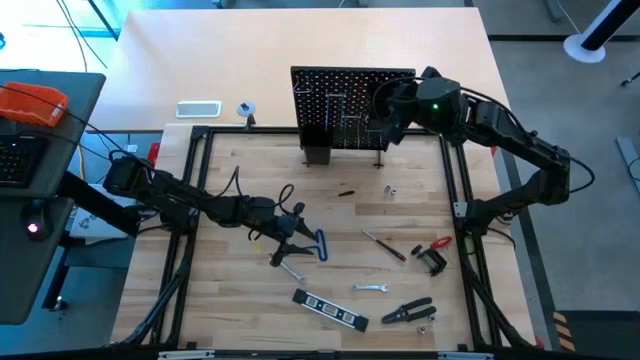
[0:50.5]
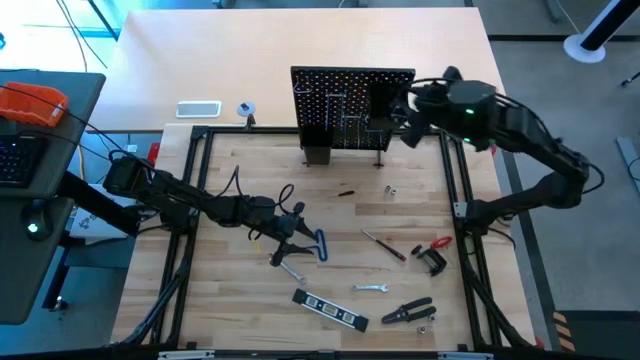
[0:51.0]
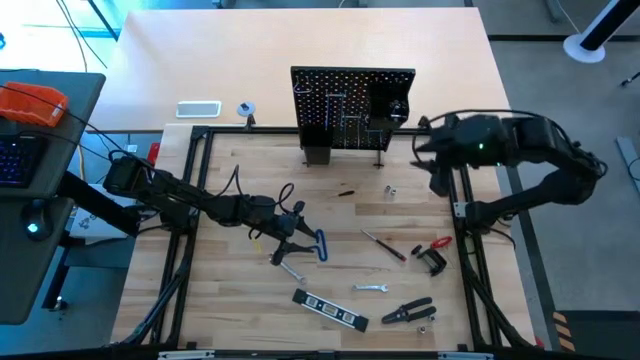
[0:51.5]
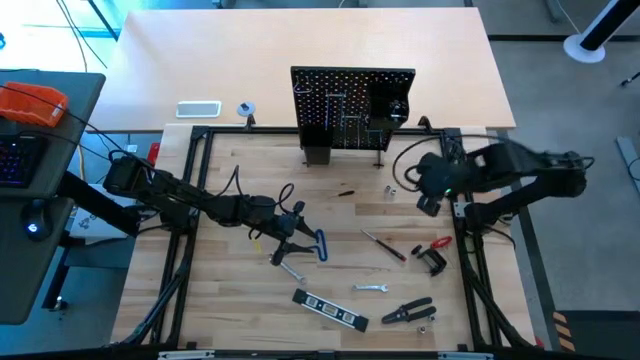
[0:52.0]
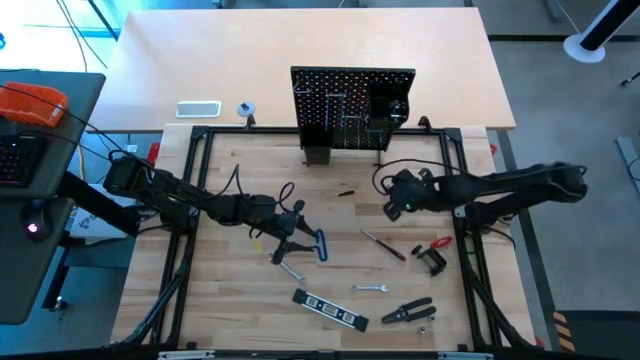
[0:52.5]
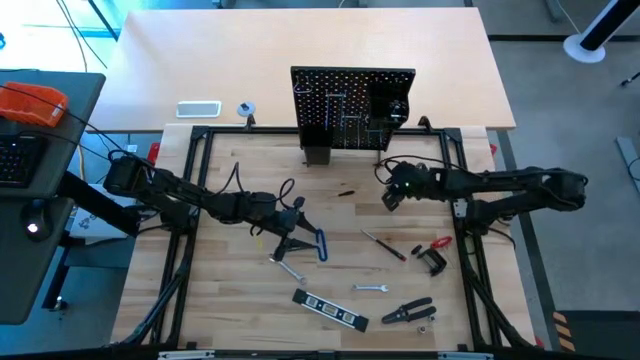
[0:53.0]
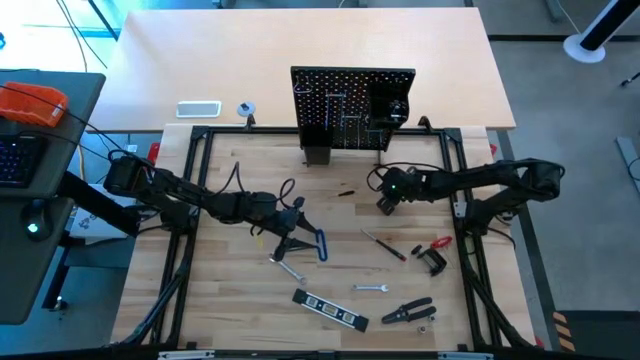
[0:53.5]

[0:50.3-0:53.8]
Task: Hang tools onto peg board
Put the bolts on the pegboard

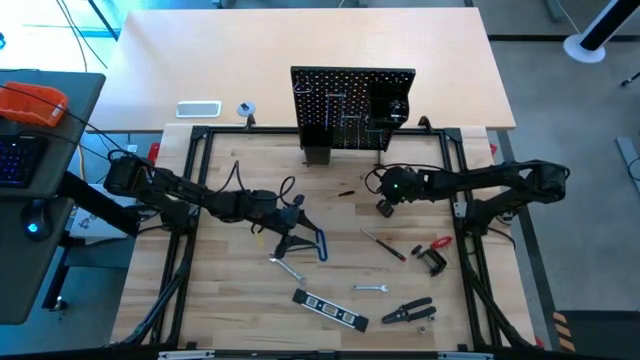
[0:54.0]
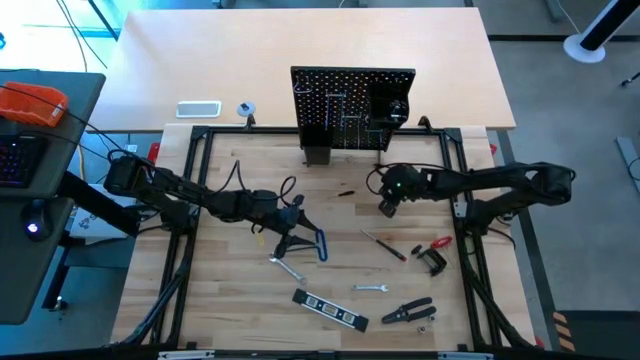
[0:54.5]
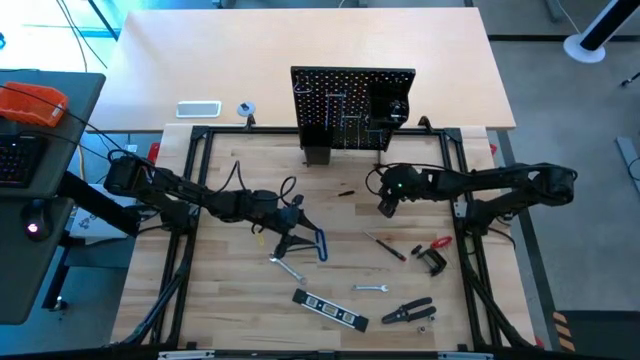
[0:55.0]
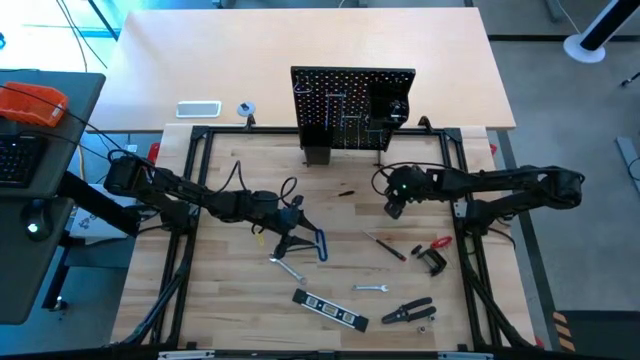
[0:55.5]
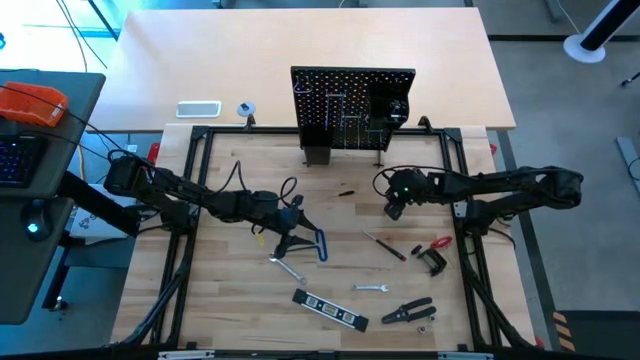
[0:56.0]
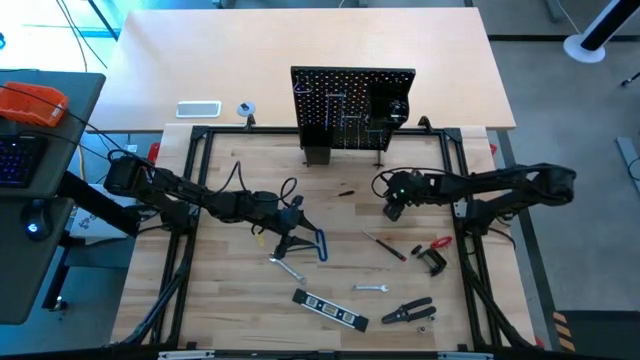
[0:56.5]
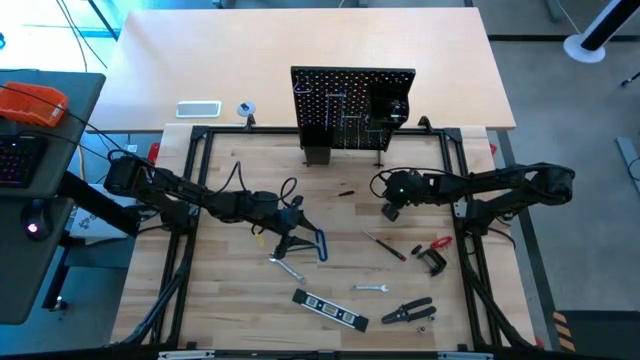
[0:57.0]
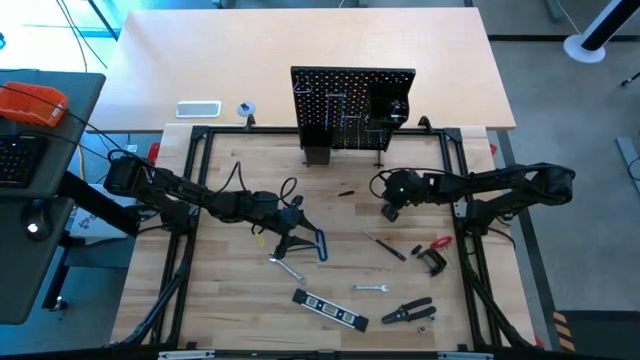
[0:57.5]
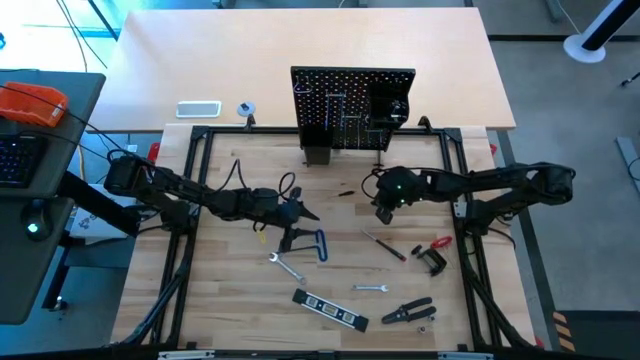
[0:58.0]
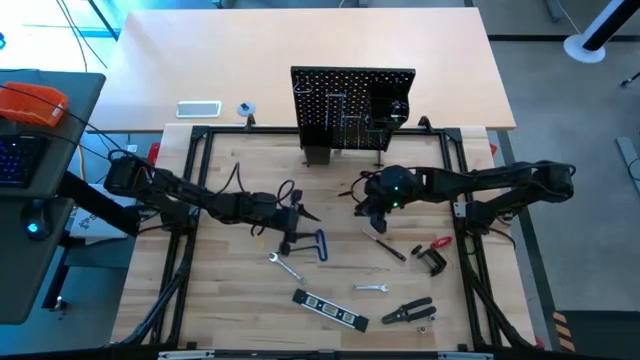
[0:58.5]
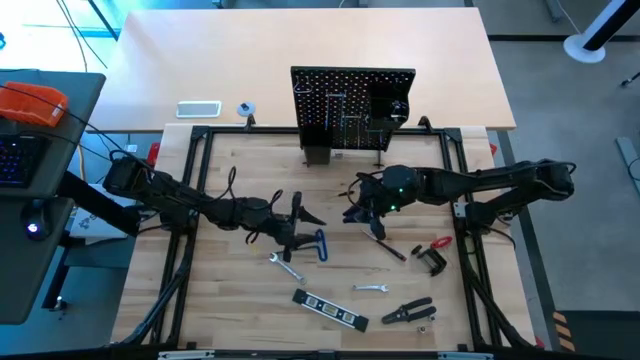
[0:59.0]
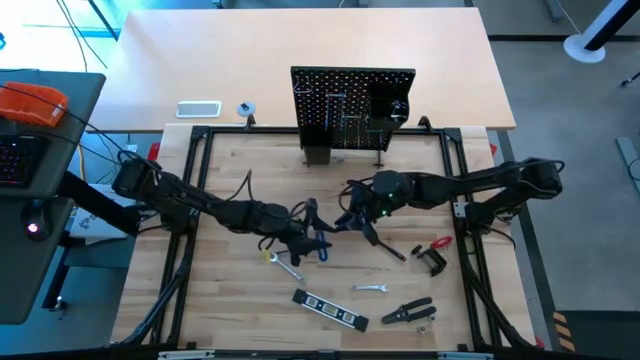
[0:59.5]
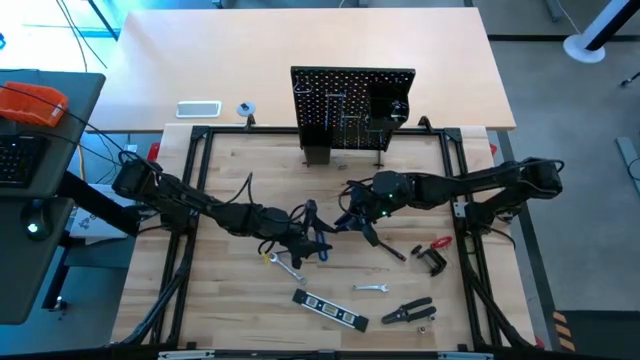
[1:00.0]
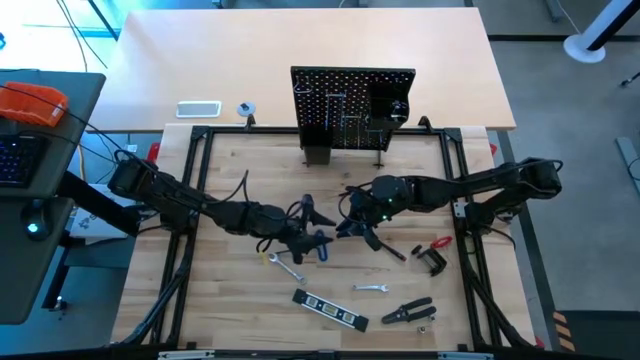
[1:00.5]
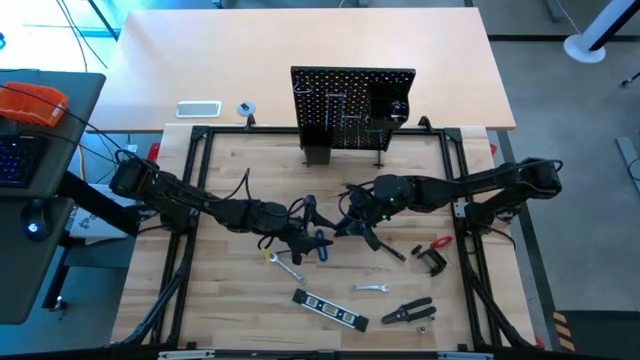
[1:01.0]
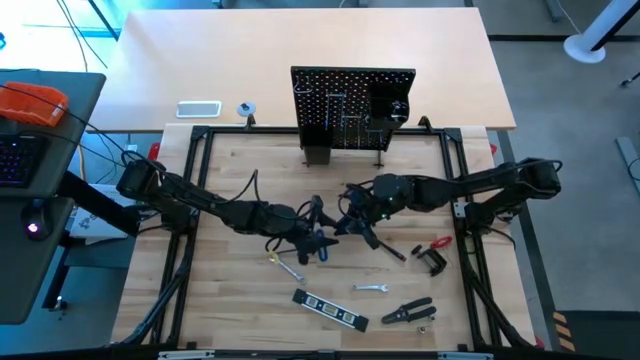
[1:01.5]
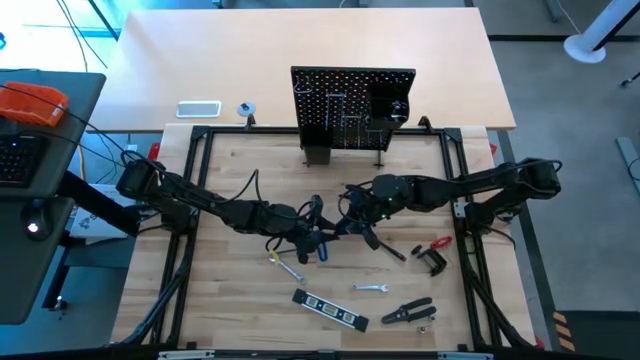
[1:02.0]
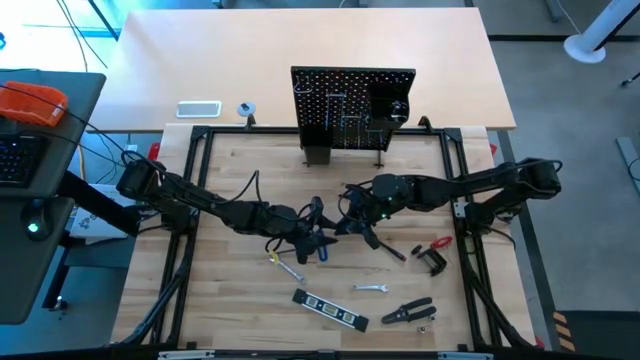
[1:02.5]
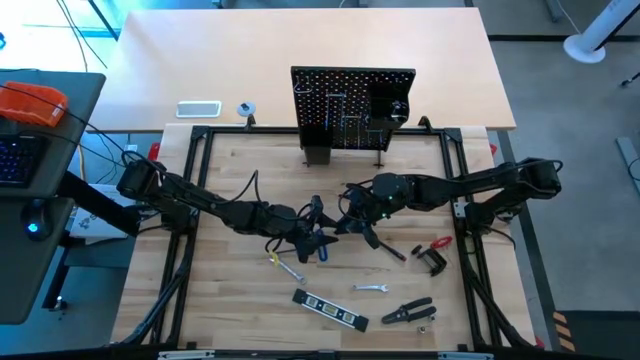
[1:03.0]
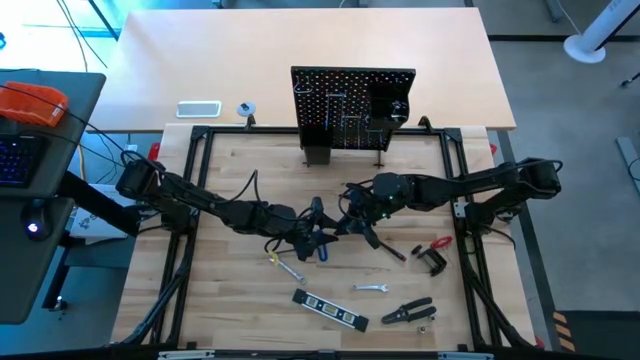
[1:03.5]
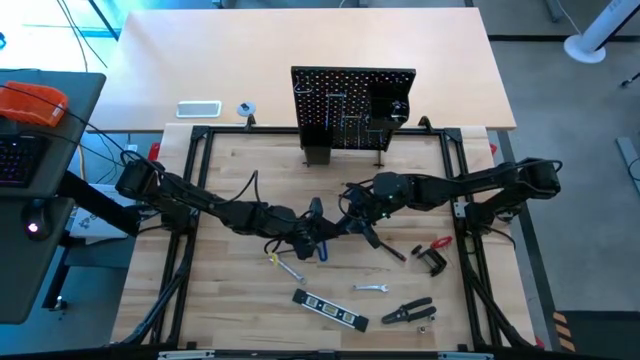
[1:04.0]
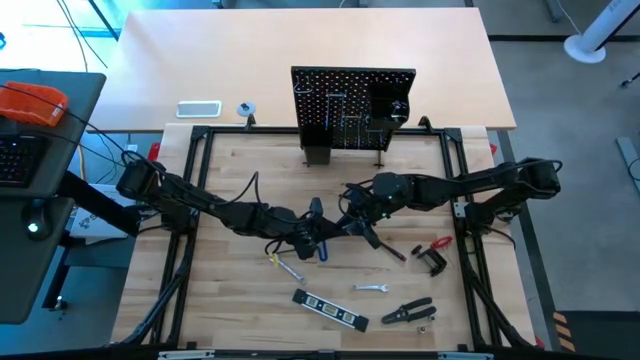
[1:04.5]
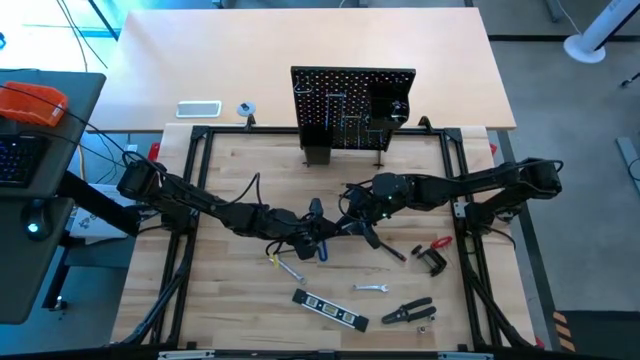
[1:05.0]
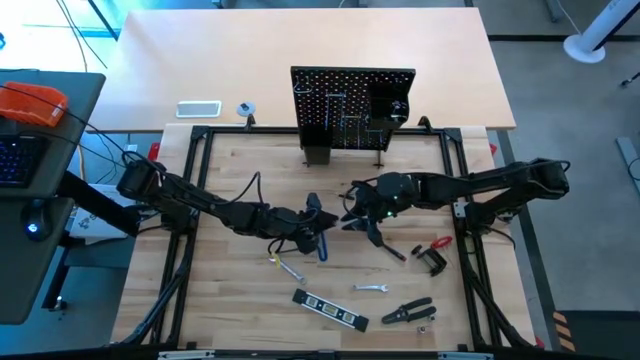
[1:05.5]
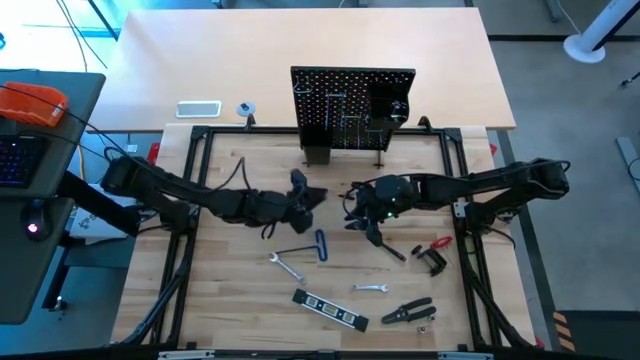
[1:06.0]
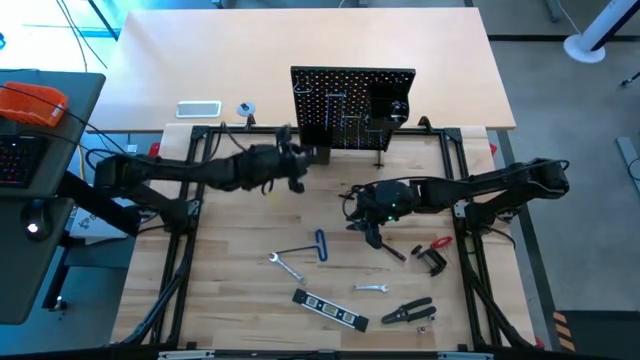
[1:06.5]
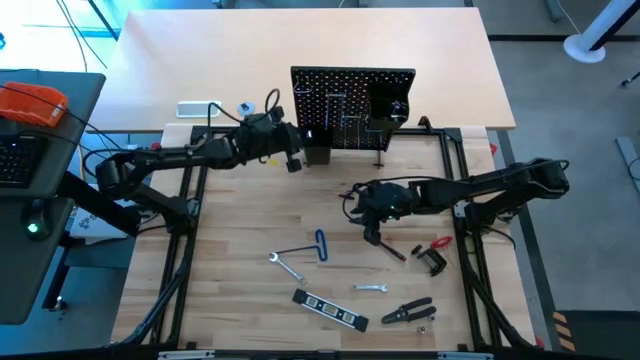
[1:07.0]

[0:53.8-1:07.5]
Put the bolts on the pegboard

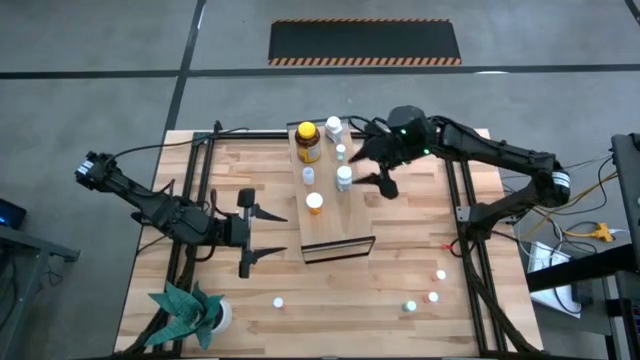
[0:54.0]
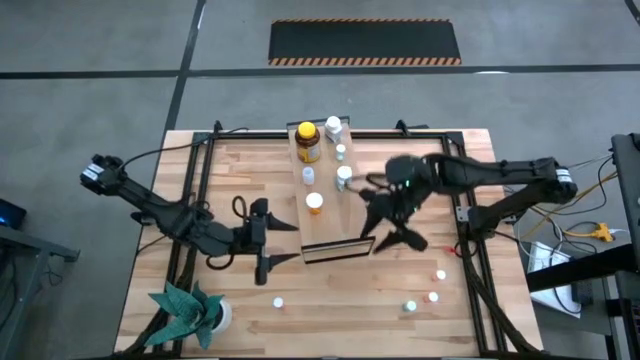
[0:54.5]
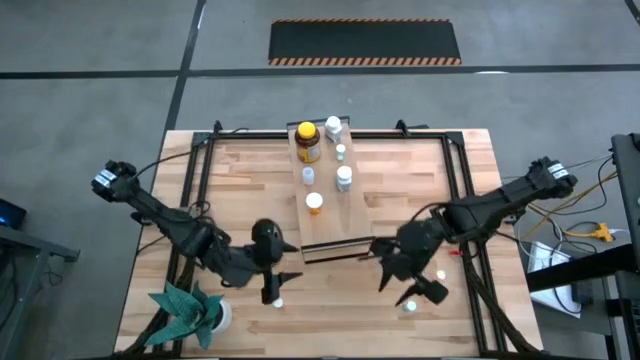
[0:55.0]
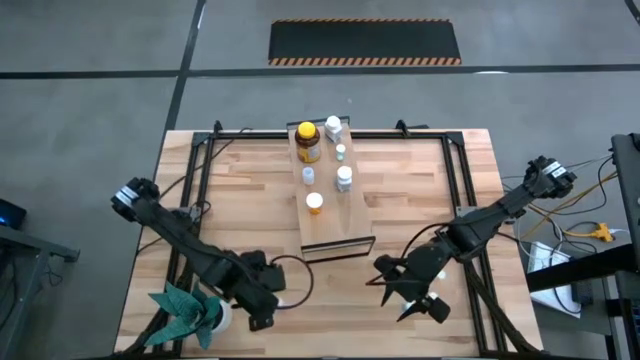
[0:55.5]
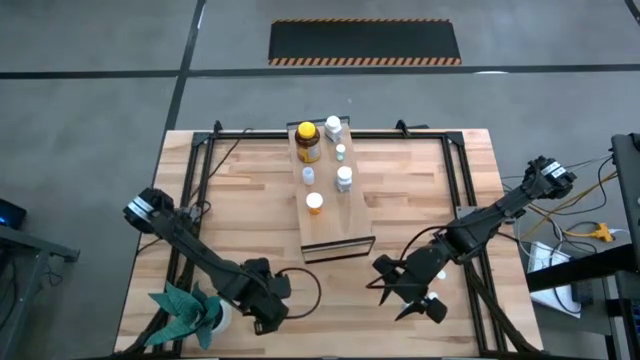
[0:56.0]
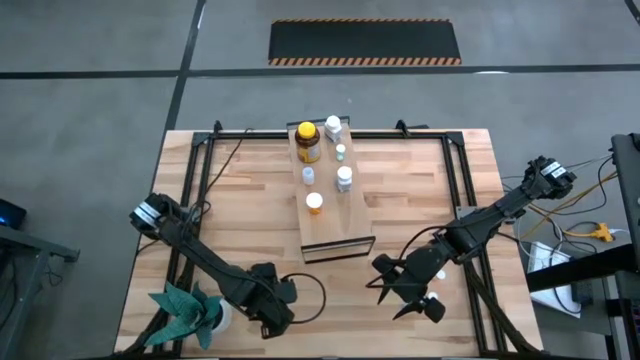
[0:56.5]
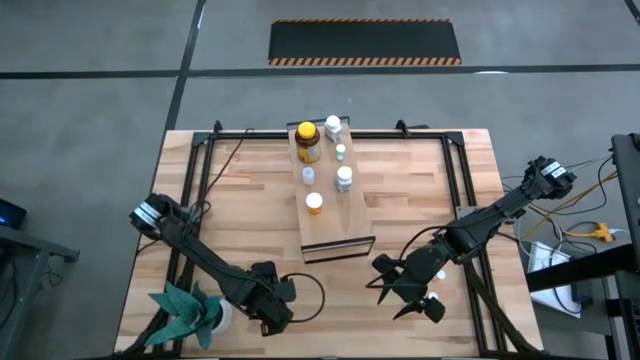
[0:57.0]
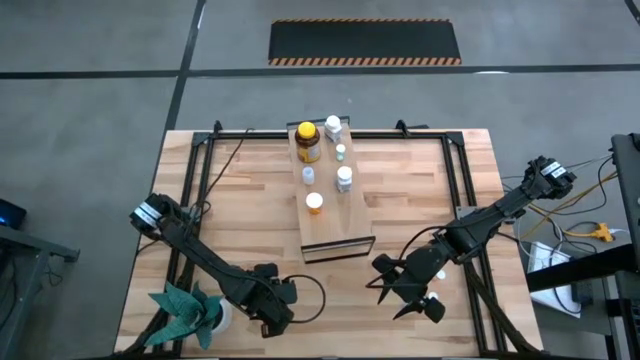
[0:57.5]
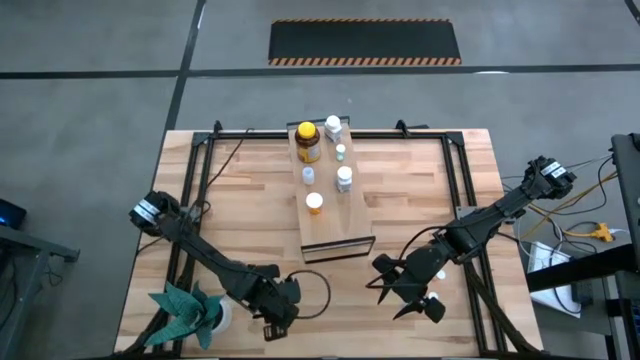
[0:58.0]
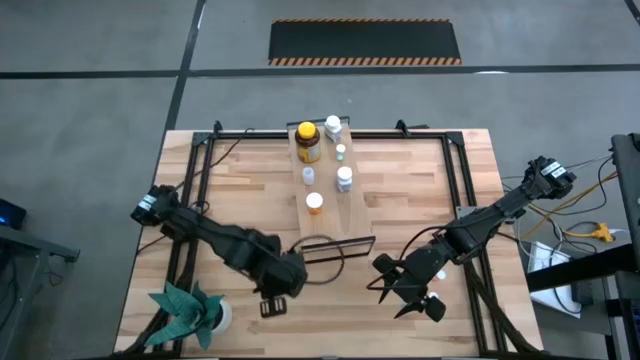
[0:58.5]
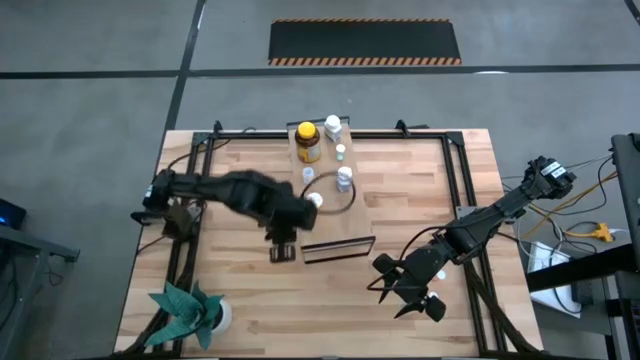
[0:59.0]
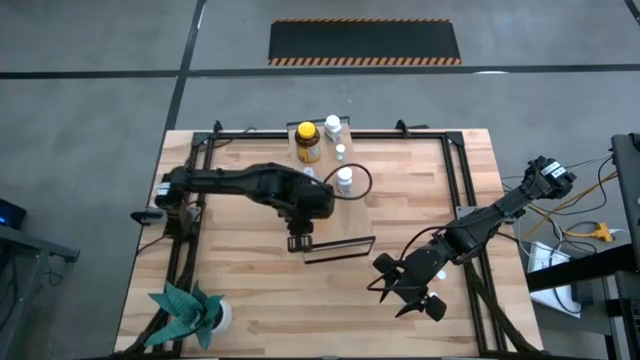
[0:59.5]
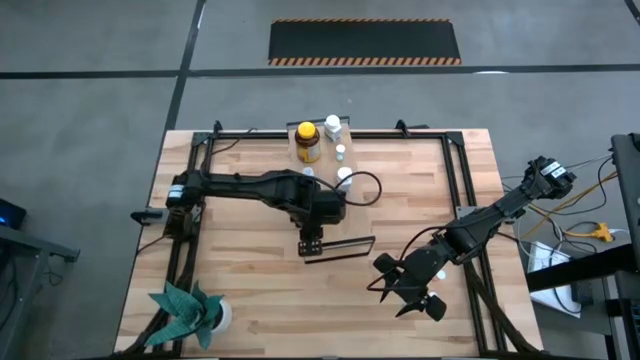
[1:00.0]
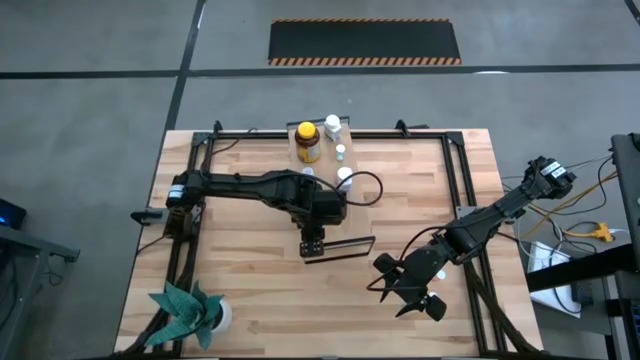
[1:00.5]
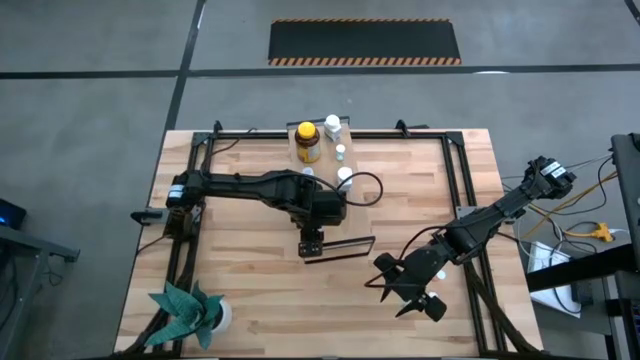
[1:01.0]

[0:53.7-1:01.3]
Task: Pick and place medicine bottles onto shelf by color
Put the bottom left pink pill bottle on the shelf
